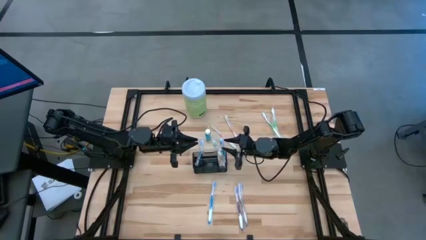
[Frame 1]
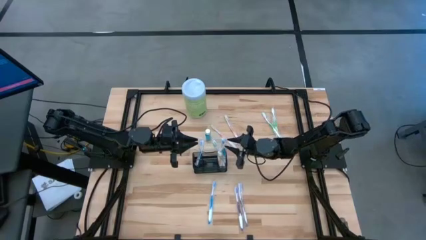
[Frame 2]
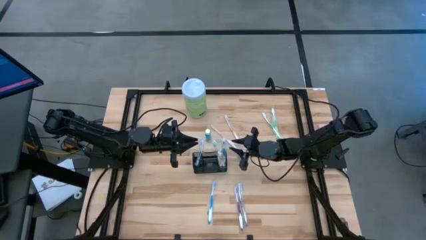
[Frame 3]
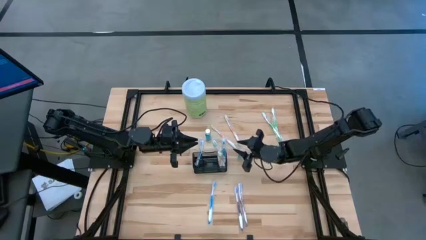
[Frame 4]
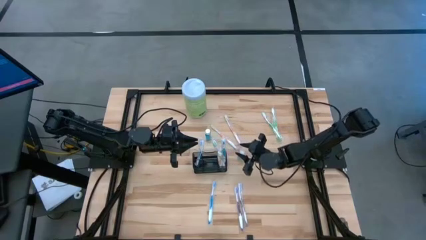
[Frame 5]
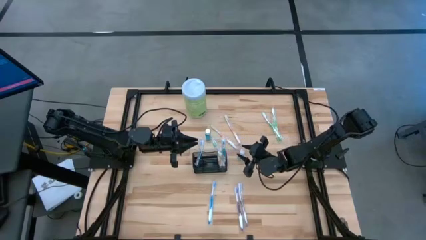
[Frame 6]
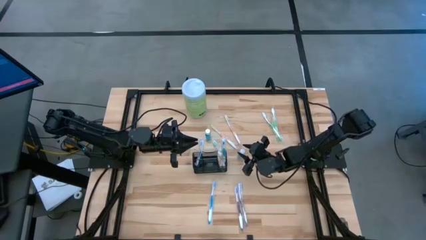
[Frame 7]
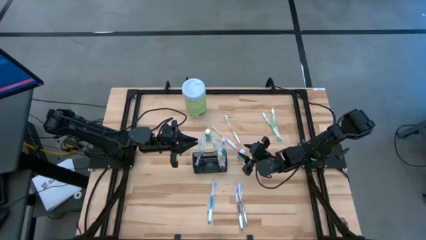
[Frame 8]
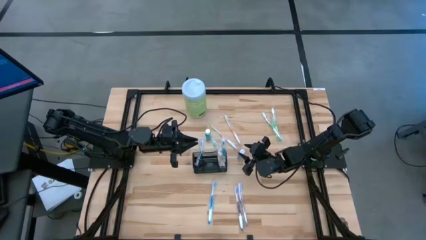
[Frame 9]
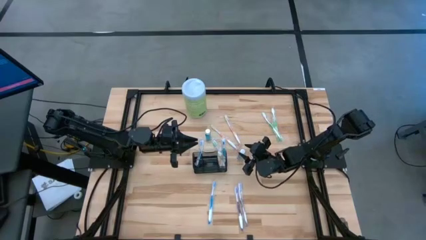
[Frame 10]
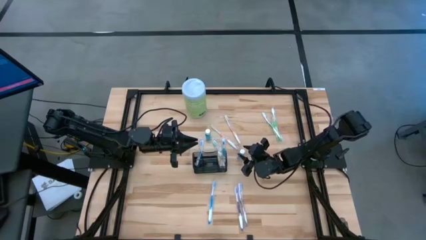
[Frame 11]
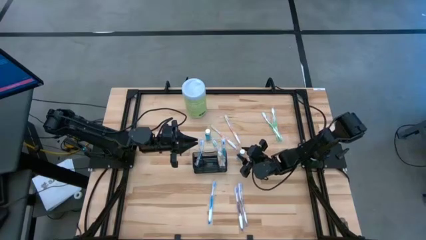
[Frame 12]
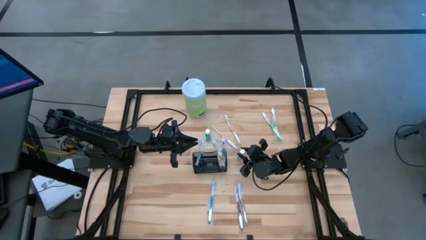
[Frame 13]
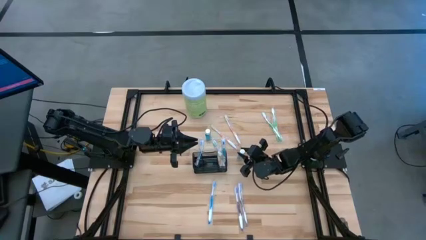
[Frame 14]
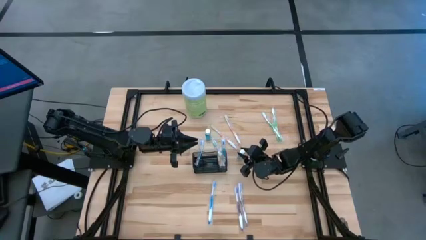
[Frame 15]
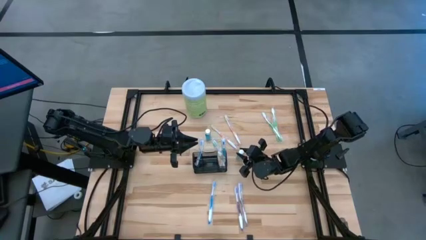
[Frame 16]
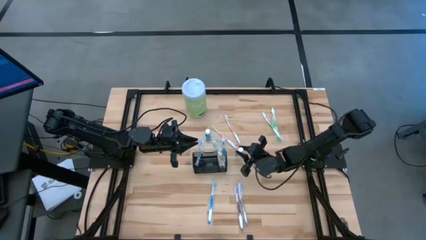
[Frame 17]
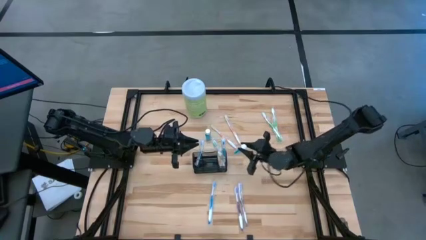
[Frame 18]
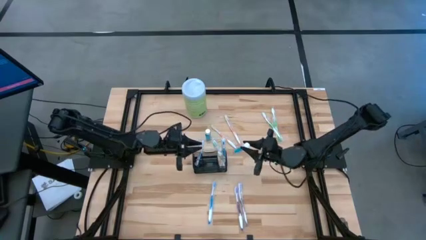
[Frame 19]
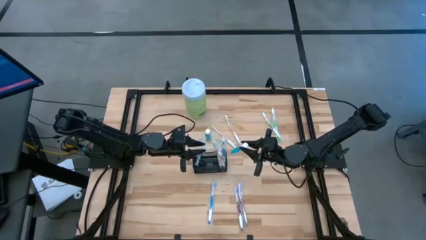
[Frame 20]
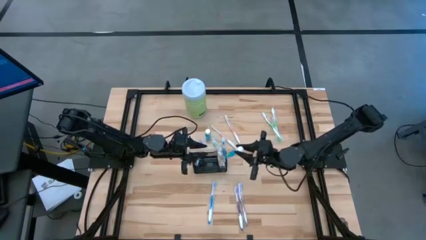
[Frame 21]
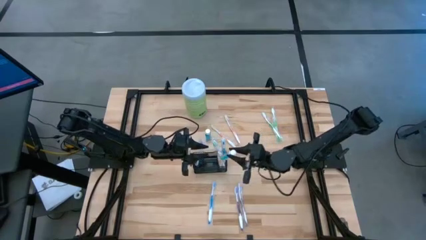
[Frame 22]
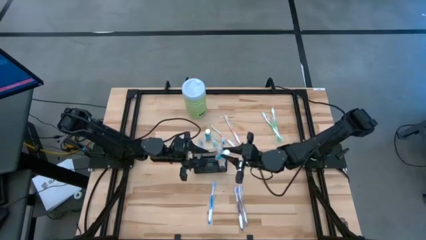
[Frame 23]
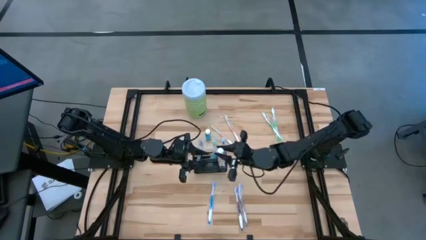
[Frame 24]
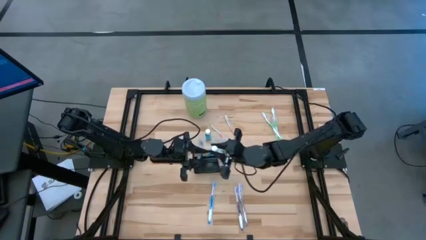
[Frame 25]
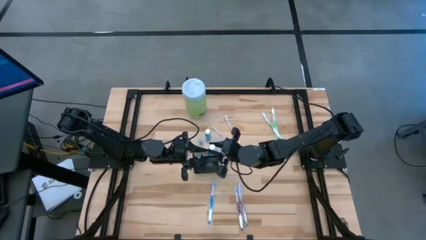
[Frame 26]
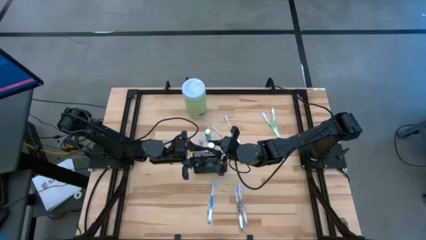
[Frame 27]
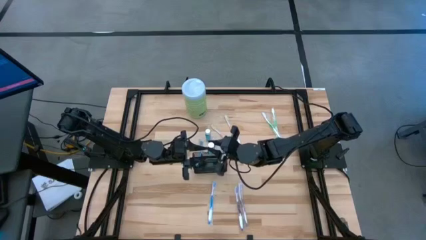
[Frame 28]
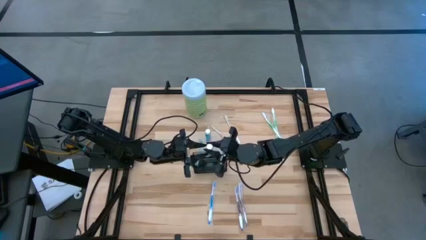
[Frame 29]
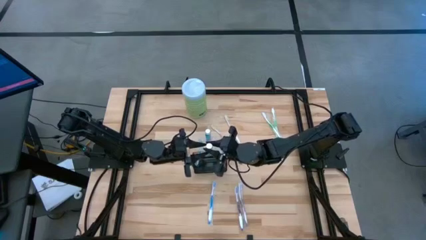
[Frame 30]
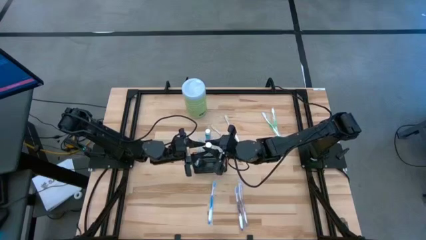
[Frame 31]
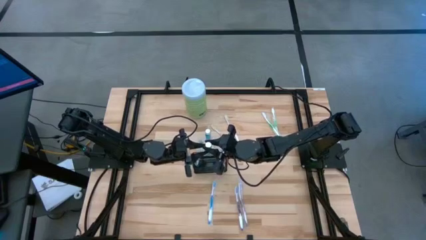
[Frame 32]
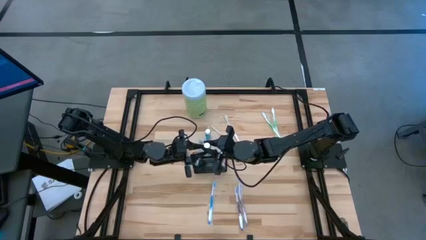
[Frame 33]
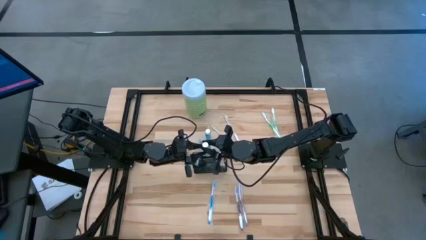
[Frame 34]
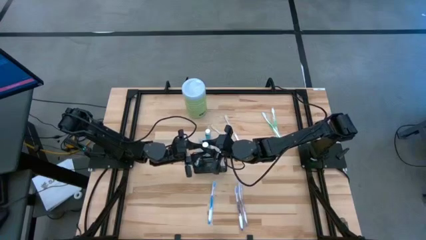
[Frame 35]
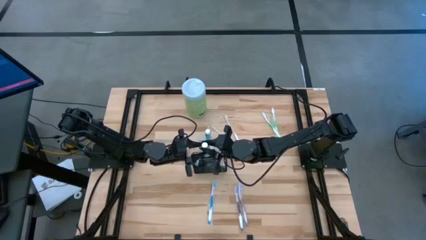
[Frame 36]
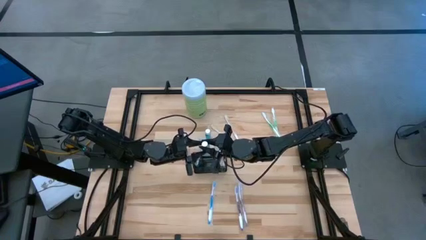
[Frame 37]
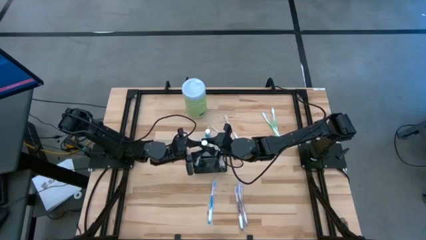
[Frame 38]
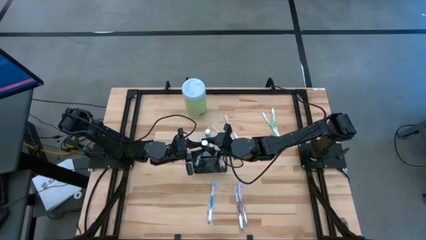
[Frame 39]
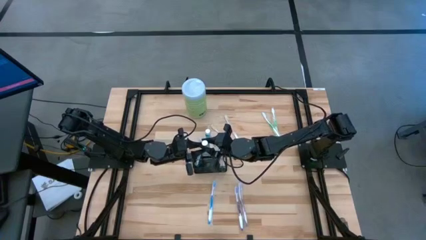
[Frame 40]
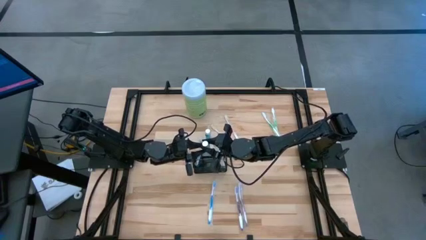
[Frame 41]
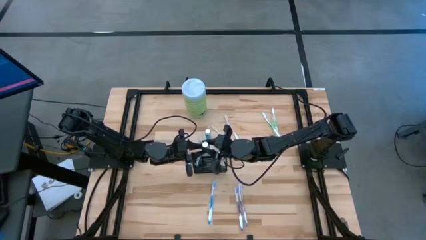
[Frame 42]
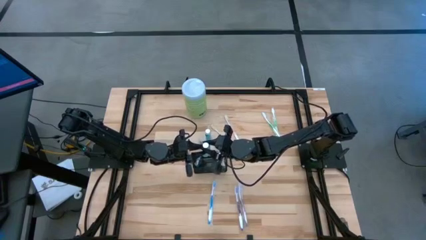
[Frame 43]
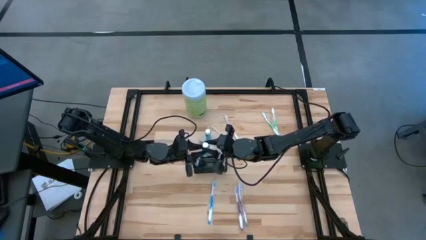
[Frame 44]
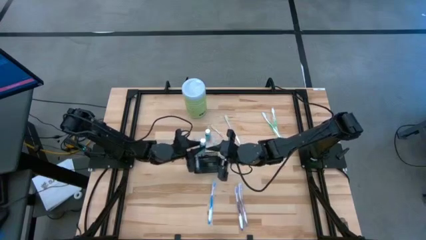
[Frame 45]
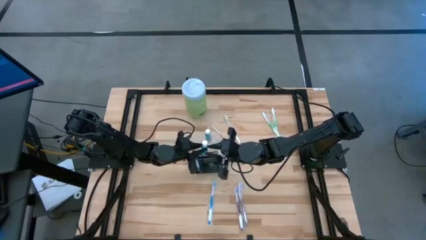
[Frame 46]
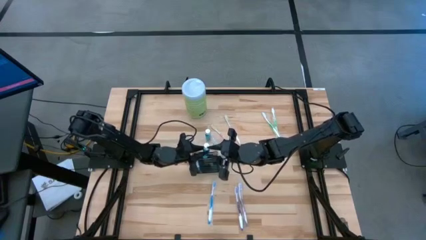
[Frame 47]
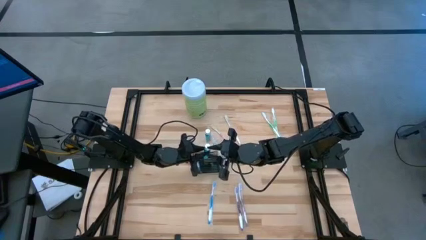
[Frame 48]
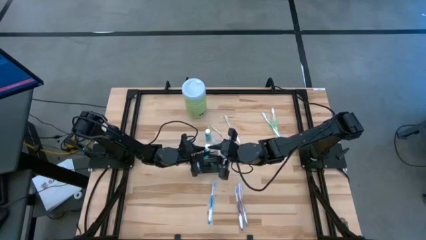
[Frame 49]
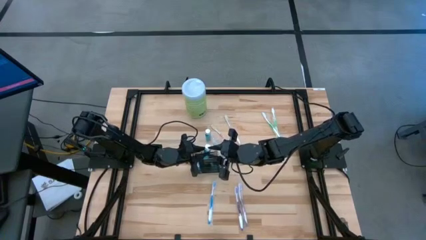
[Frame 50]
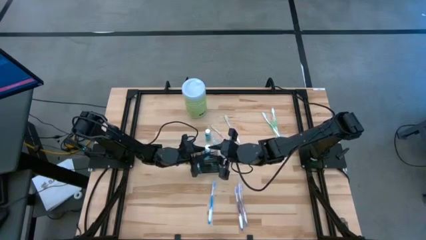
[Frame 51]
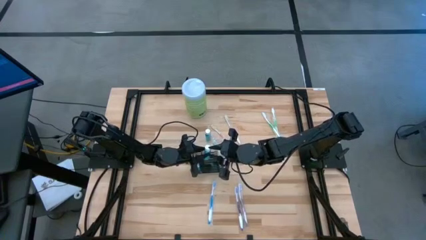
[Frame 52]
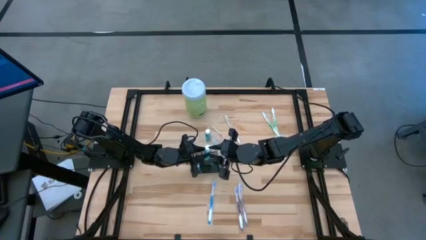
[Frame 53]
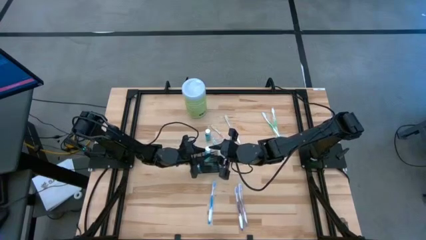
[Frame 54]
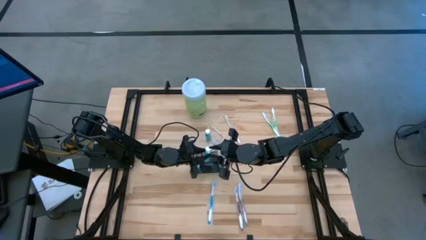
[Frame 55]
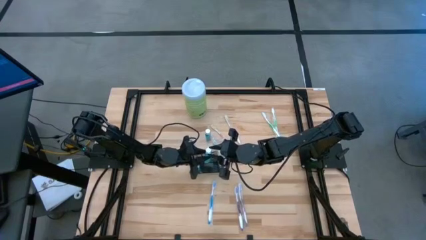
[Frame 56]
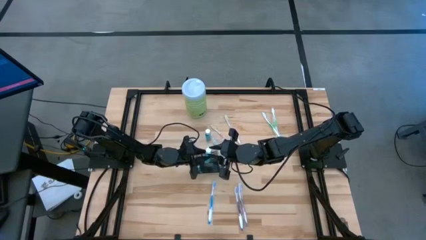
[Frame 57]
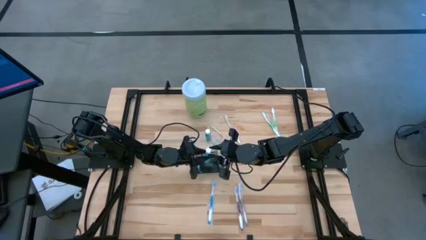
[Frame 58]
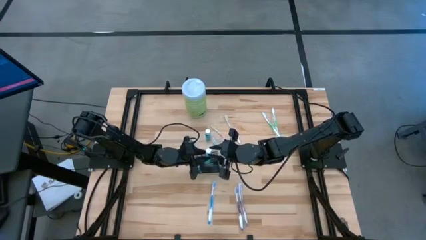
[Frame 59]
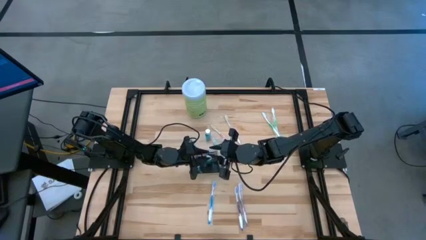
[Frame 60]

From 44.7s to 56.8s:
Task: Pick & Place toothbrushing station
Put the mouthwash into the wire organizer
